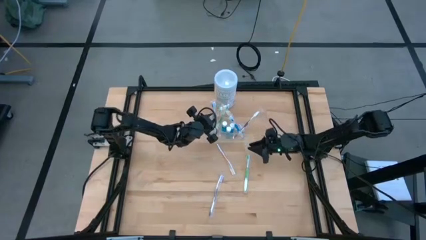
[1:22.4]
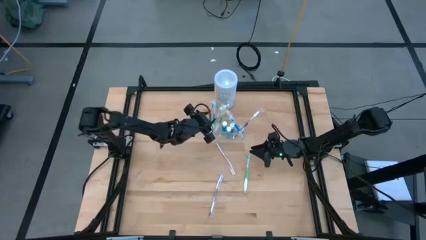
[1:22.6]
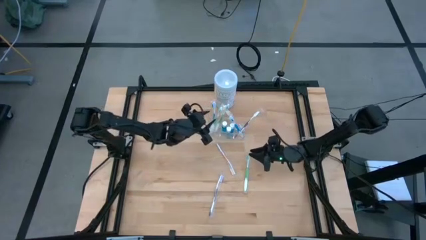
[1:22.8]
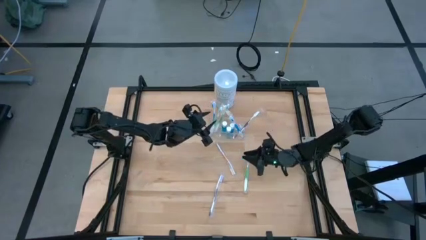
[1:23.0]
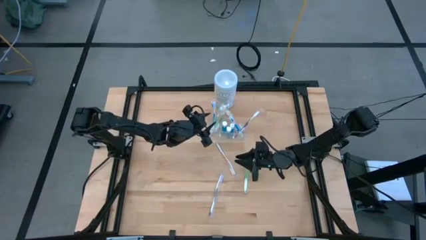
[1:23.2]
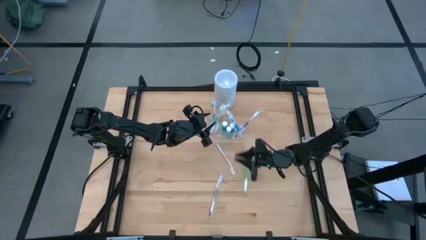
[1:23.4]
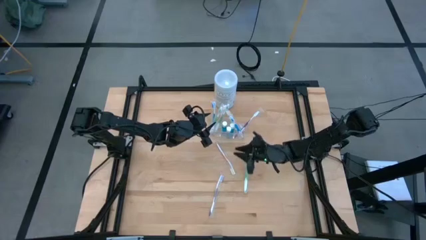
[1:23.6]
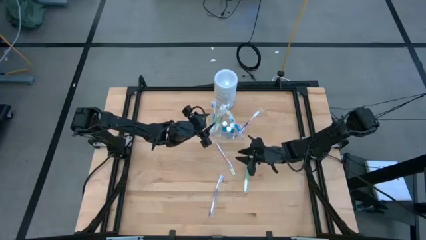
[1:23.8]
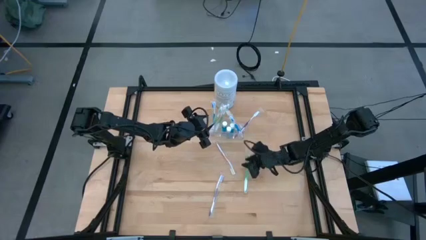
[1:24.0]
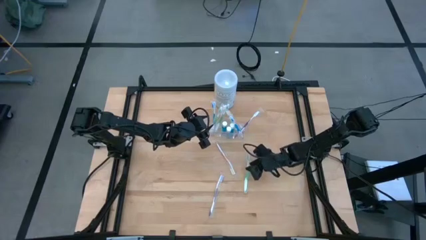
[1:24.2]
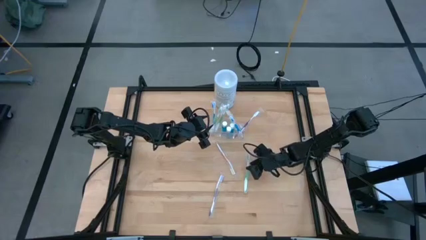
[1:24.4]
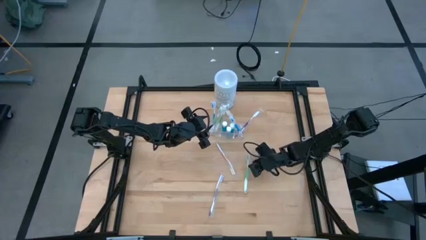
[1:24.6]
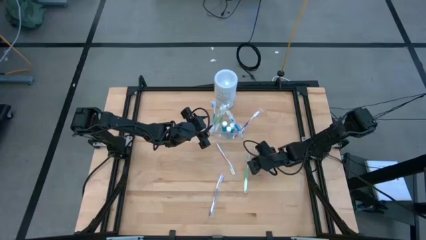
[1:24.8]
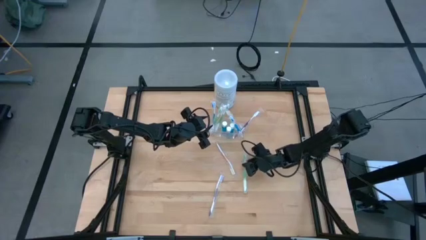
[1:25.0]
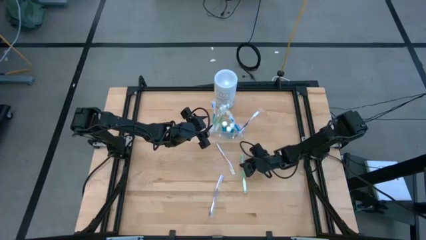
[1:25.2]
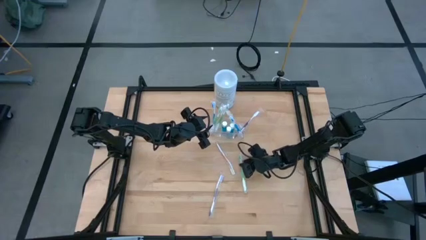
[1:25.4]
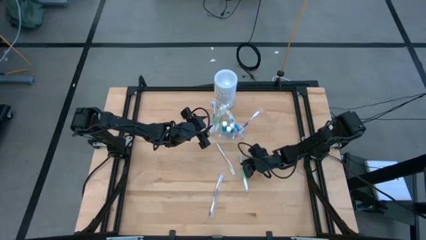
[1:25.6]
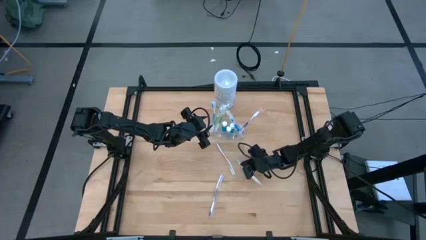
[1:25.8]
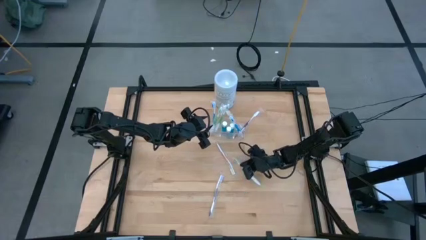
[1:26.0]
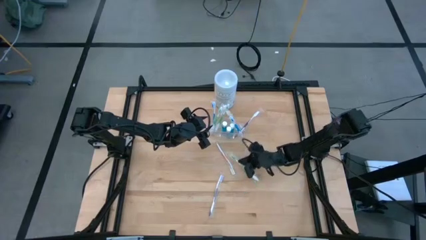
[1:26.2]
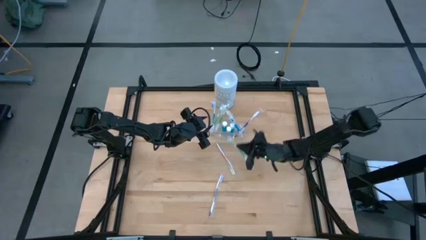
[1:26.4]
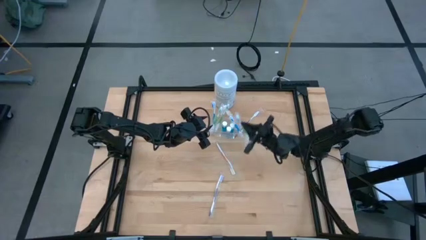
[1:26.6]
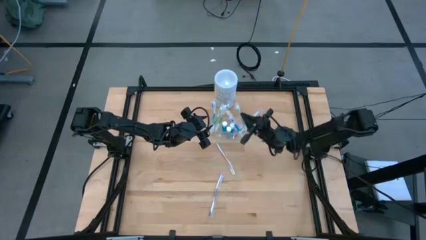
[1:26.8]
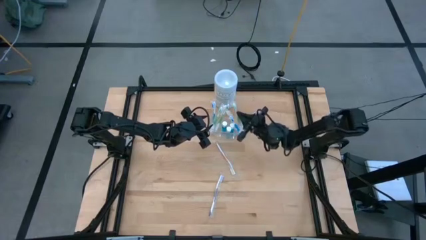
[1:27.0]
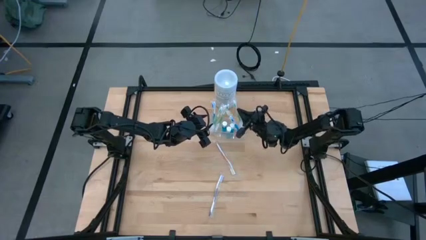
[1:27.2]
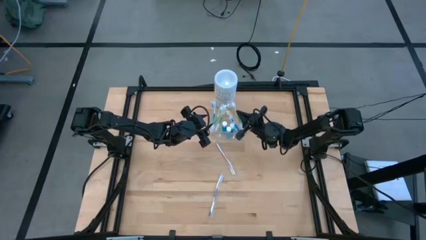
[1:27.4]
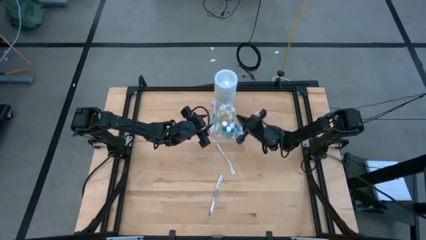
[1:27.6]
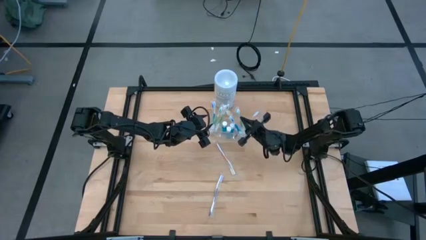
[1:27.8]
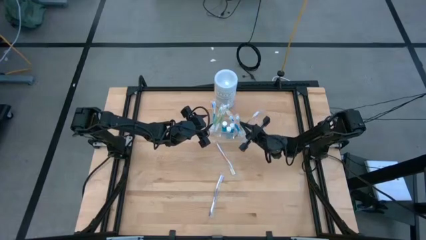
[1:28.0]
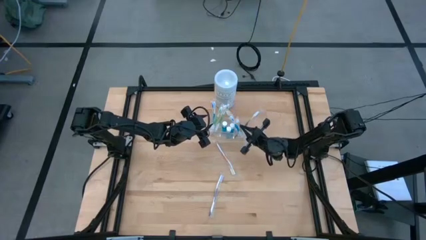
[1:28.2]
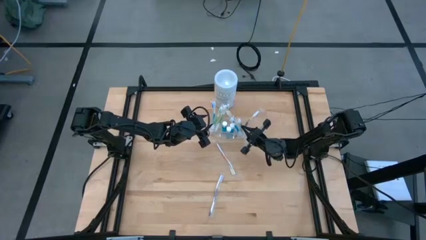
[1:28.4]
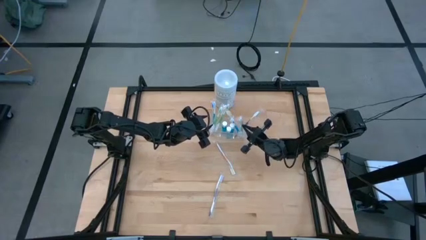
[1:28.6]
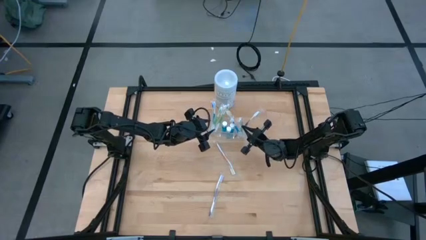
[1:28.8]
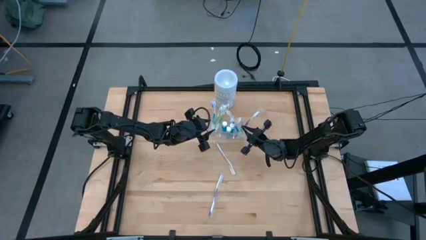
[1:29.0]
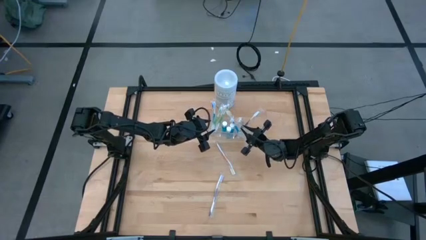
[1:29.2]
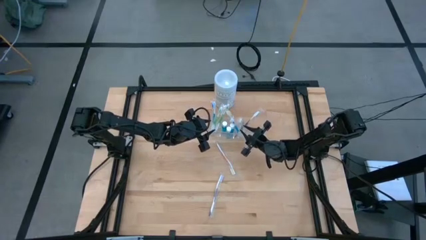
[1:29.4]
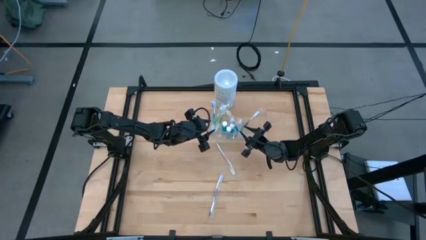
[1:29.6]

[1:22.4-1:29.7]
Task: Pick & Place toothbrushing station
Put the green toothbrush into the transparent organizer

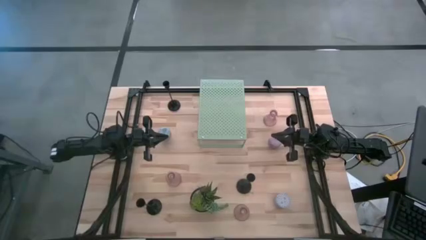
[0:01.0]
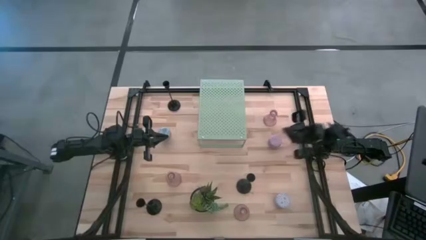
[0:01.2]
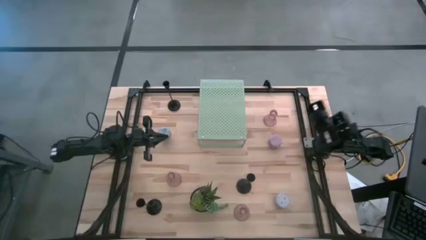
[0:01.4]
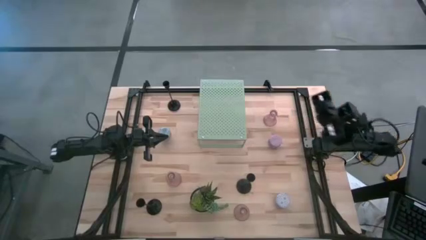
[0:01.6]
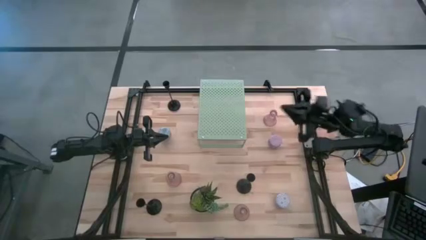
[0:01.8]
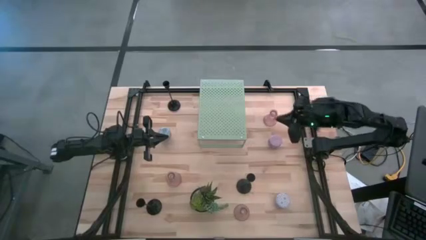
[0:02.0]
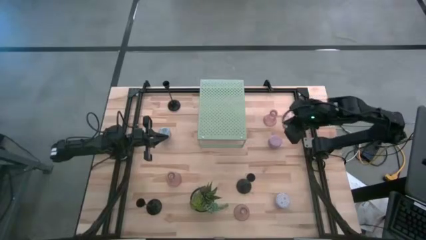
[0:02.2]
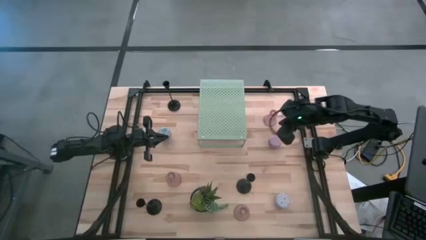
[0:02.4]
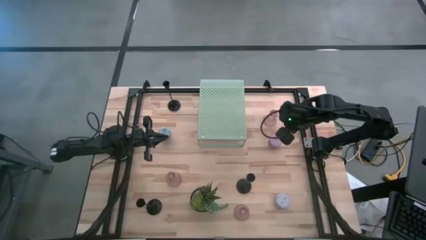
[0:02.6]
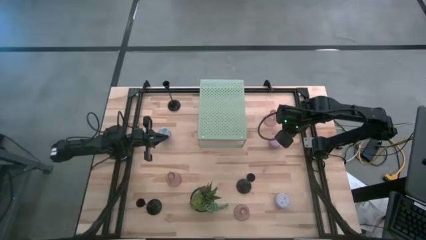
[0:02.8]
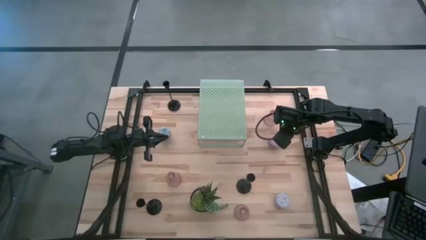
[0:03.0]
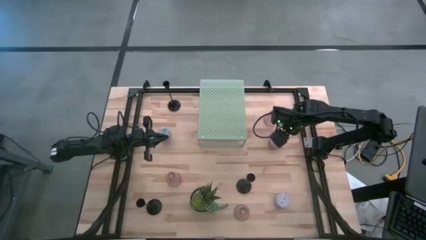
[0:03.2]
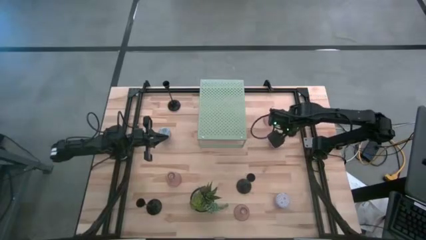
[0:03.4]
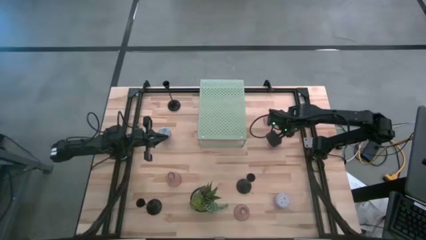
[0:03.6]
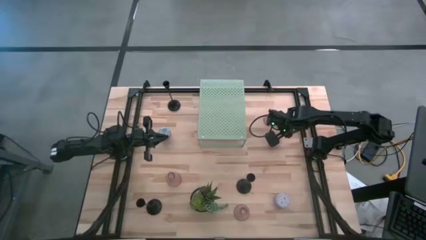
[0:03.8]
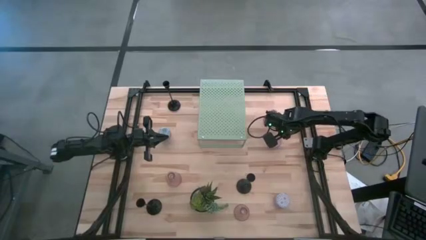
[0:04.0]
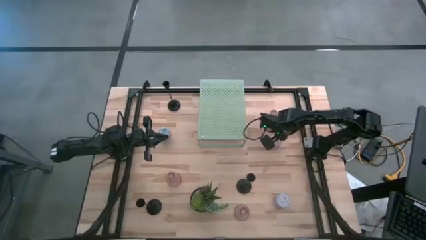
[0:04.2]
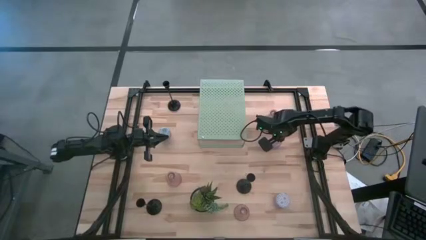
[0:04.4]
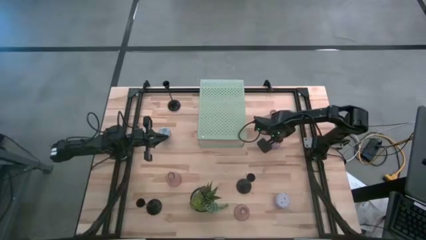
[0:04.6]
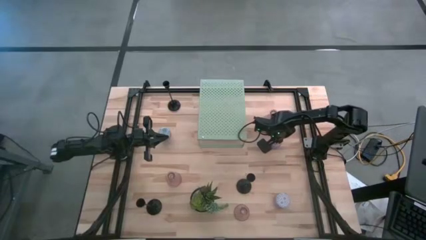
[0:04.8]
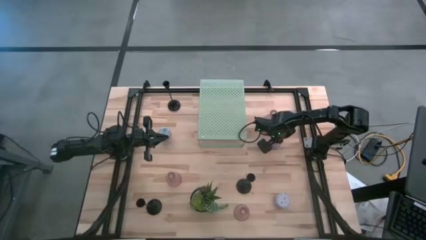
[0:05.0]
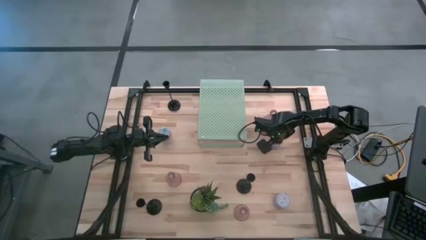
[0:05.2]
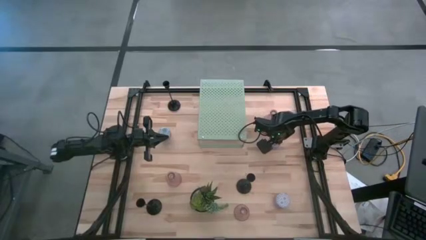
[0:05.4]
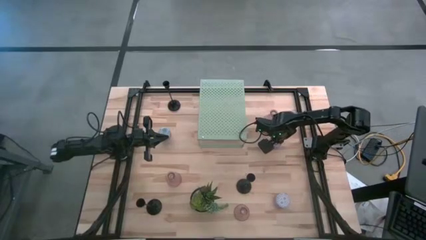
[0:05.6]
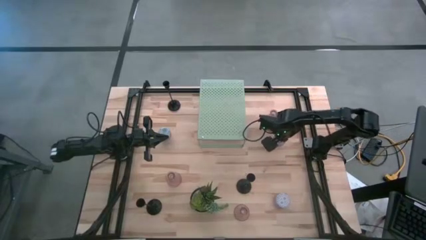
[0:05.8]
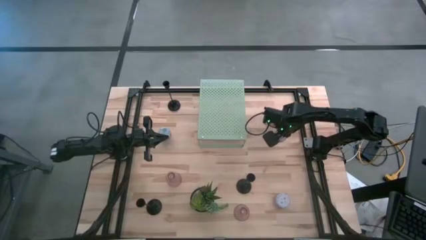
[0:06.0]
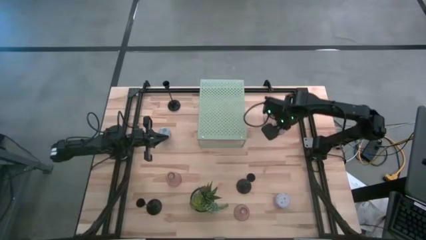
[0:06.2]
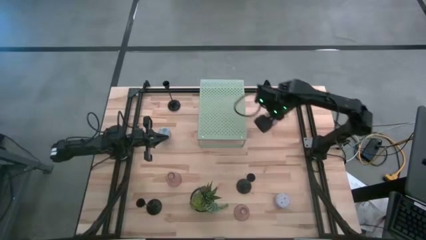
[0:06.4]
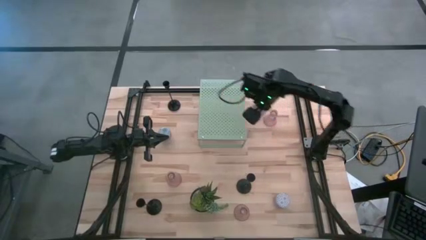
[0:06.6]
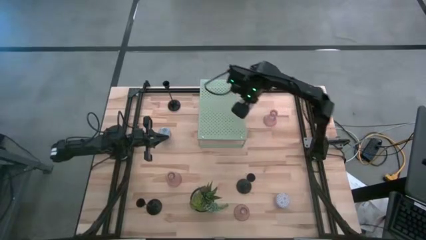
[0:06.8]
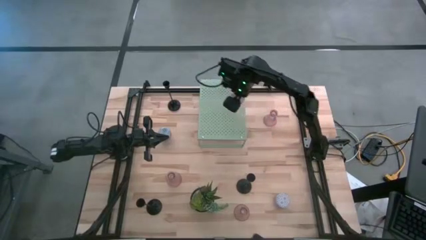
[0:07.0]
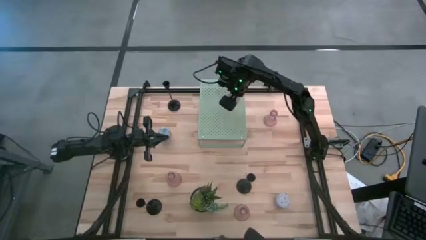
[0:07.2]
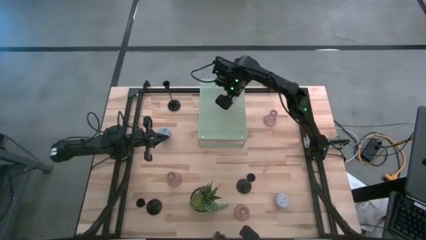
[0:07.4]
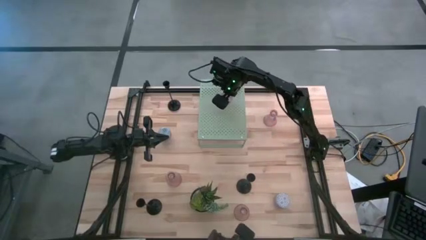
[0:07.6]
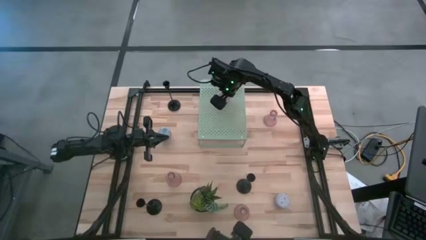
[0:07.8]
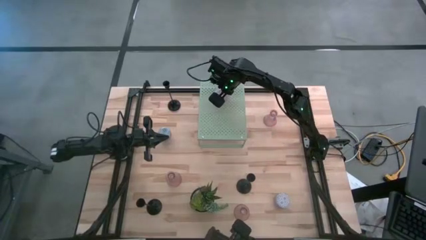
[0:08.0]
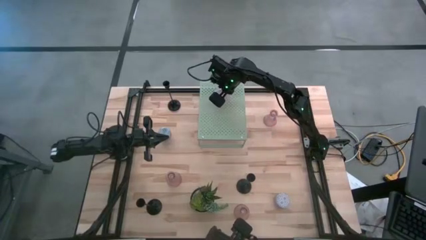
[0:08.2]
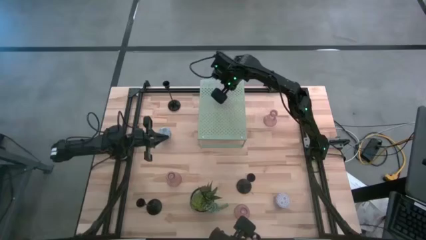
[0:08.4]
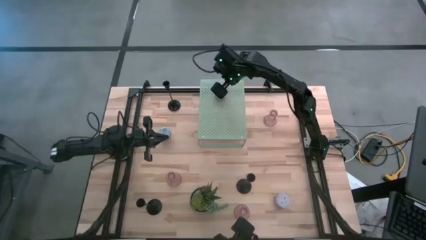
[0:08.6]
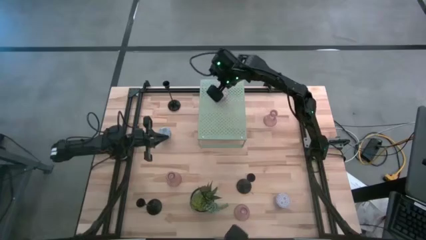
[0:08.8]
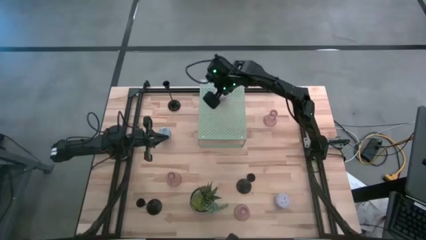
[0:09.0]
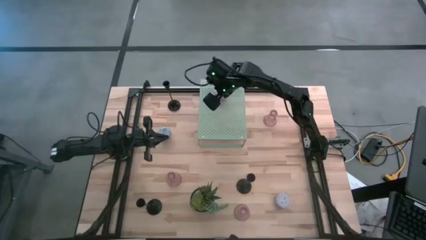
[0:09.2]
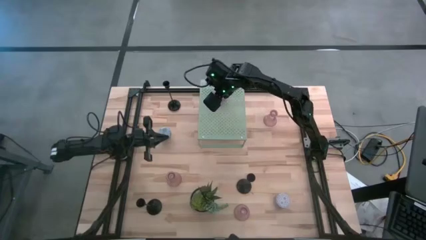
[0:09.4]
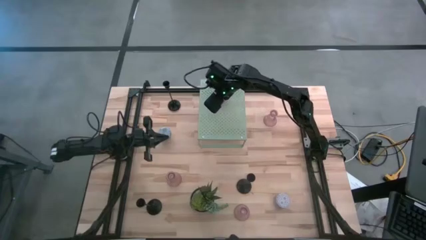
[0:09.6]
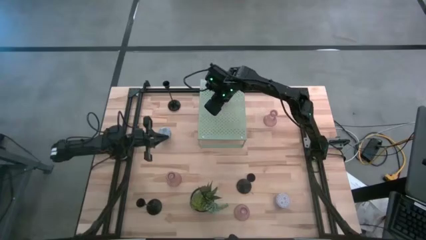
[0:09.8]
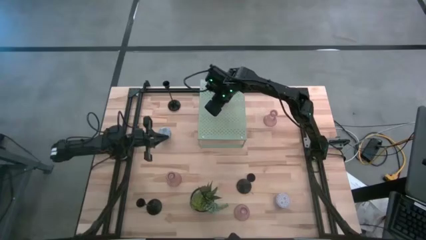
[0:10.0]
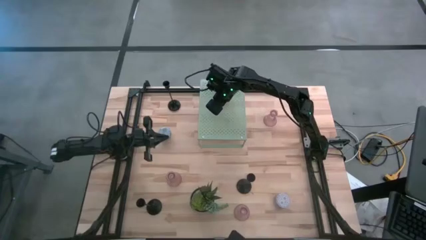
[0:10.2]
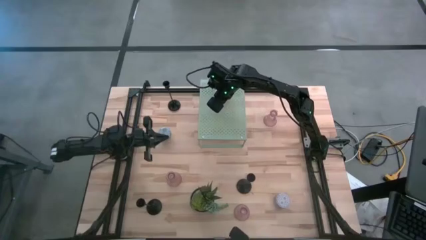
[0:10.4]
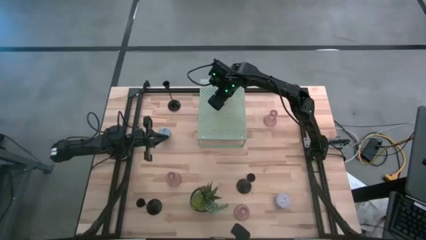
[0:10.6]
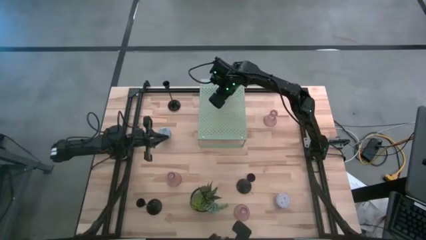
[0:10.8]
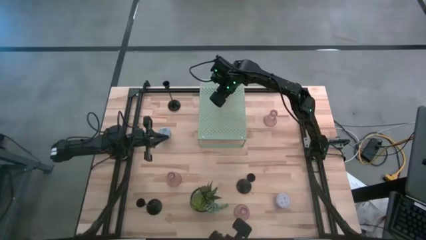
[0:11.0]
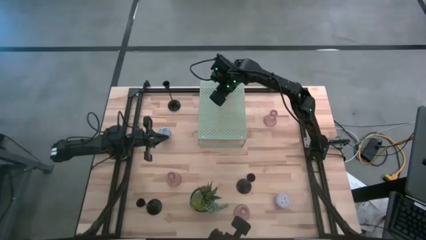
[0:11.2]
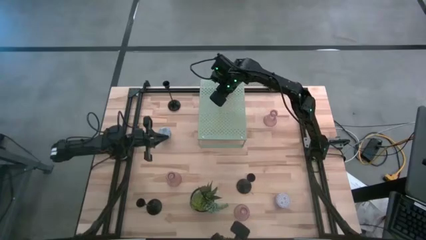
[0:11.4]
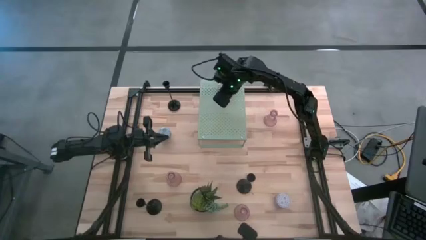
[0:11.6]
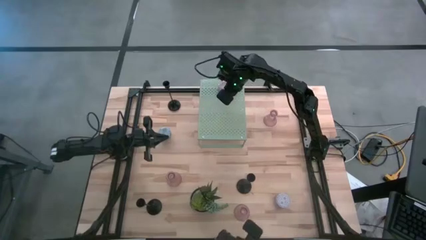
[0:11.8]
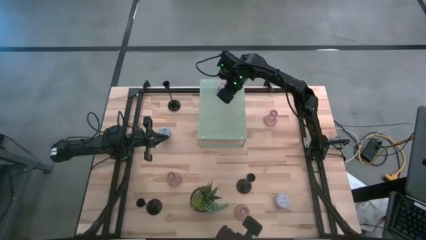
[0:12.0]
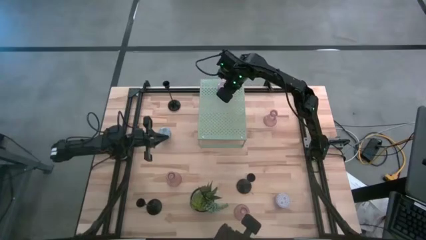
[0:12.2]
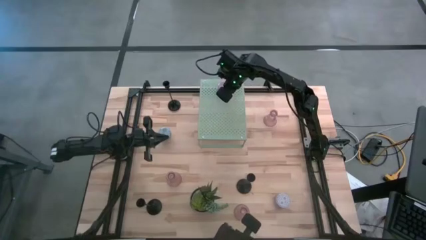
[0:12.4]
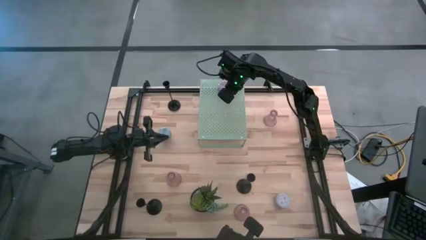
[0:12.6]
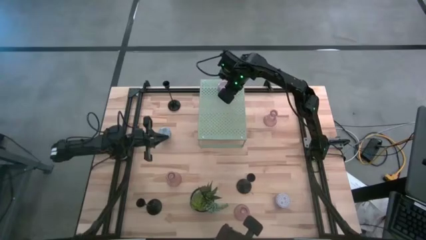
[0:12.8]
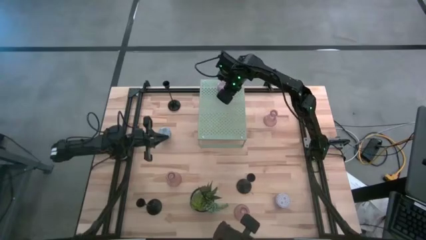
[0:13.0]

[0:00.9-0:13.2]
Task: Pick & Place candle stick holders
Put the pink scented candle on the shelf
